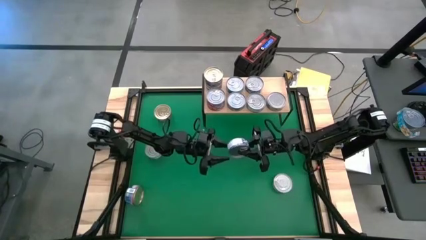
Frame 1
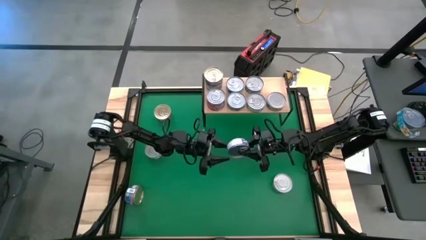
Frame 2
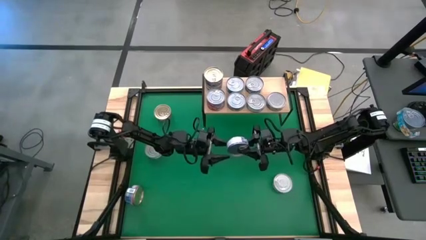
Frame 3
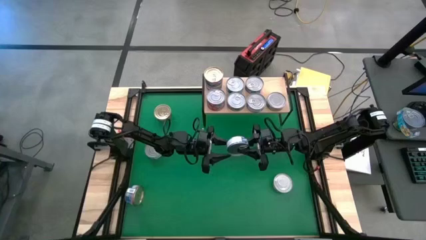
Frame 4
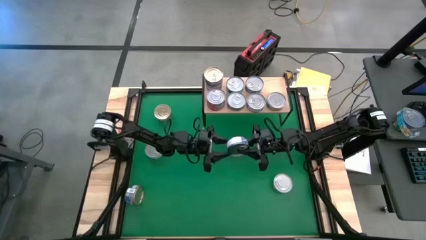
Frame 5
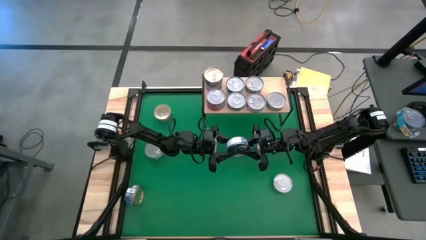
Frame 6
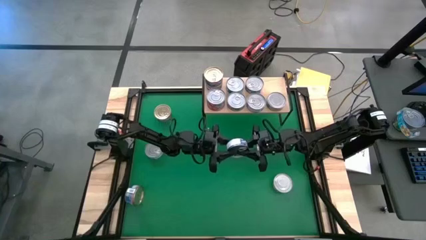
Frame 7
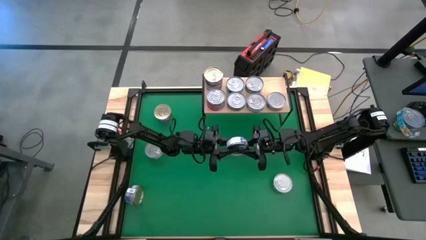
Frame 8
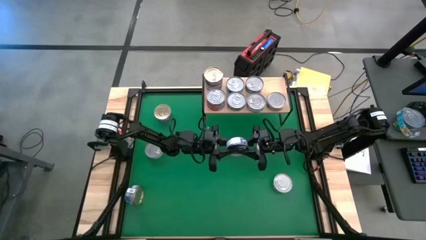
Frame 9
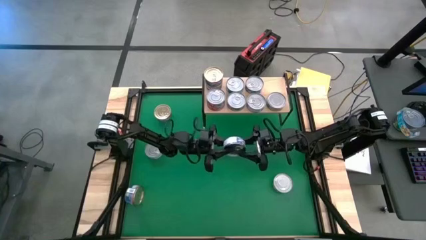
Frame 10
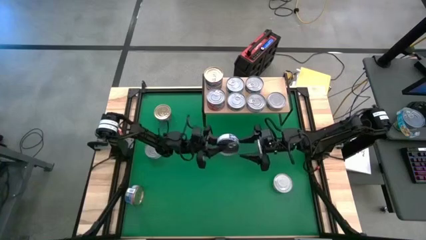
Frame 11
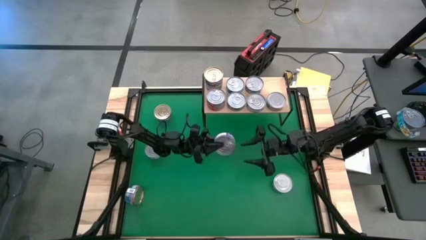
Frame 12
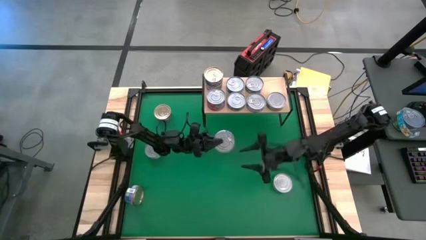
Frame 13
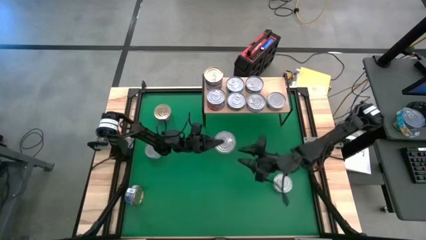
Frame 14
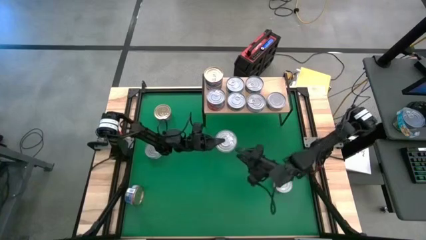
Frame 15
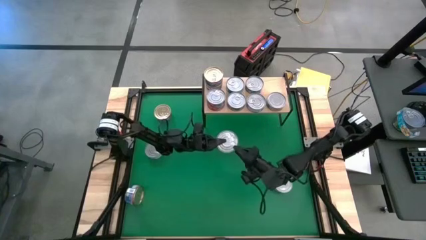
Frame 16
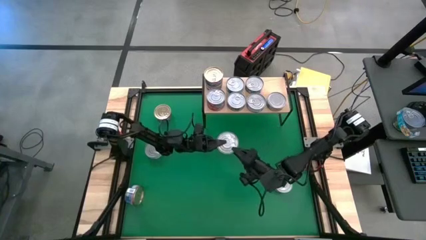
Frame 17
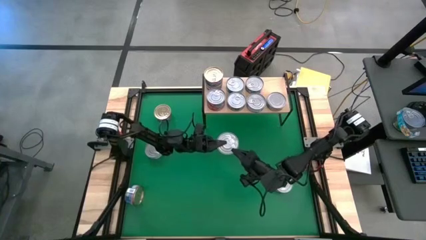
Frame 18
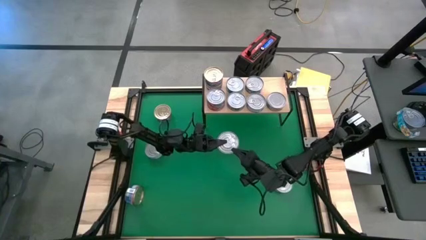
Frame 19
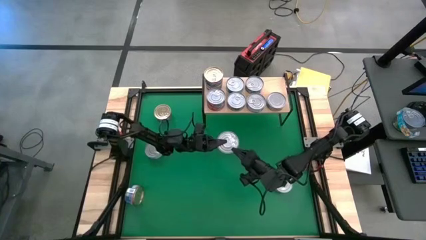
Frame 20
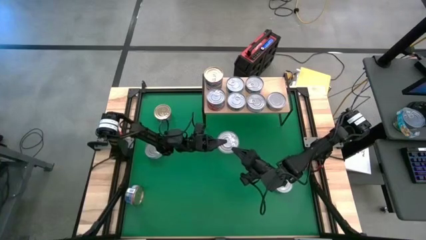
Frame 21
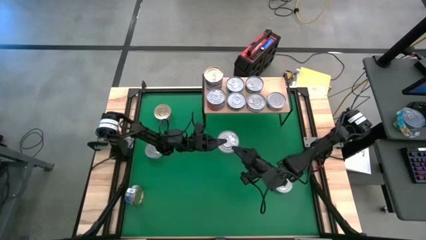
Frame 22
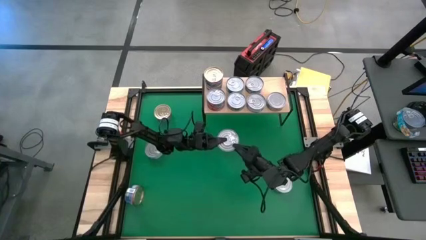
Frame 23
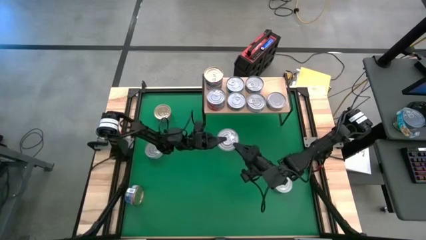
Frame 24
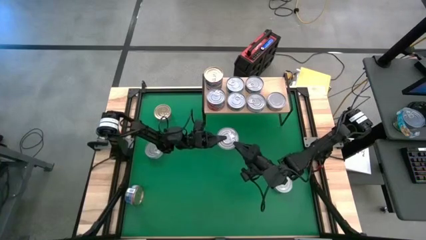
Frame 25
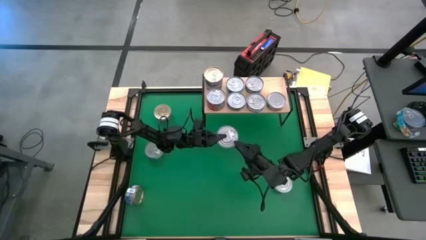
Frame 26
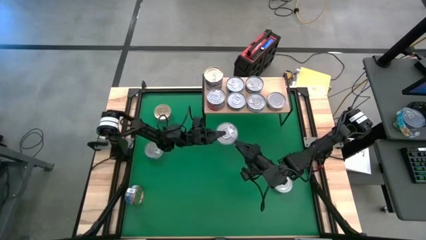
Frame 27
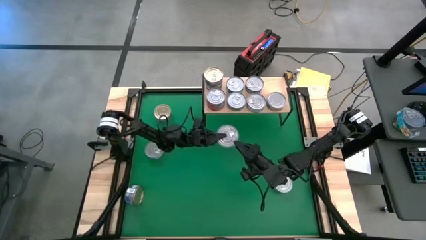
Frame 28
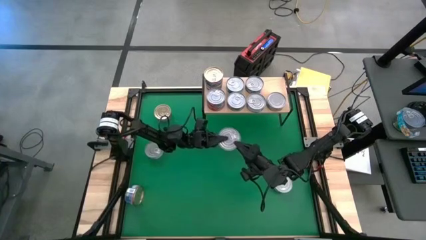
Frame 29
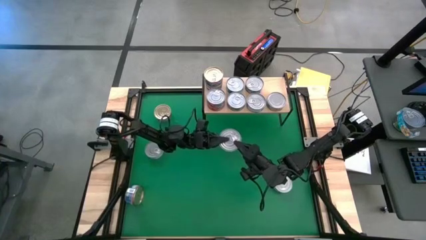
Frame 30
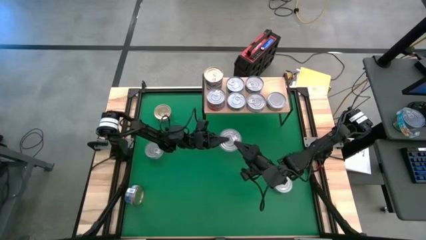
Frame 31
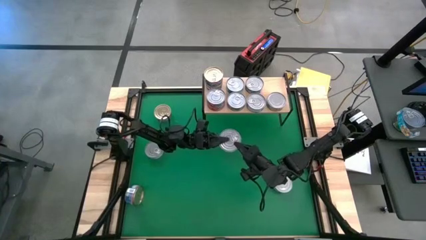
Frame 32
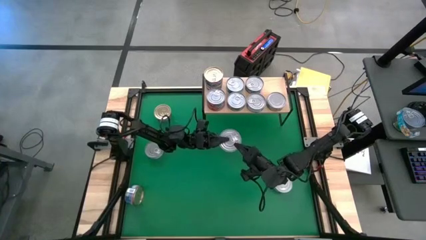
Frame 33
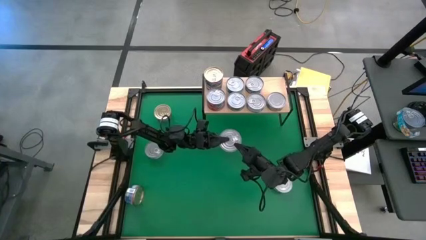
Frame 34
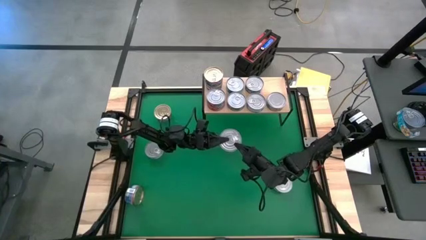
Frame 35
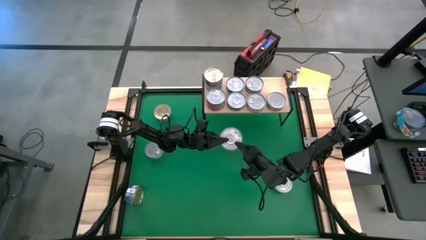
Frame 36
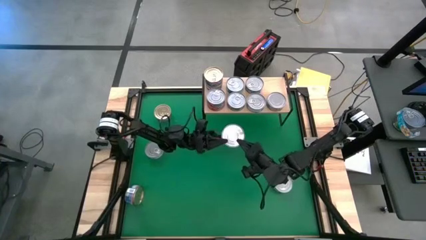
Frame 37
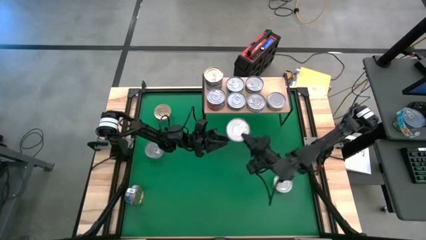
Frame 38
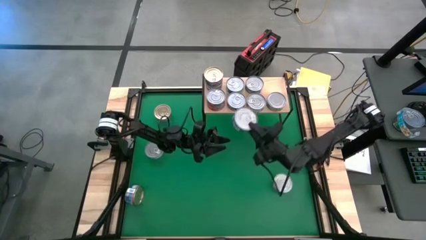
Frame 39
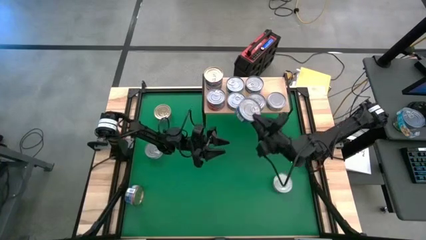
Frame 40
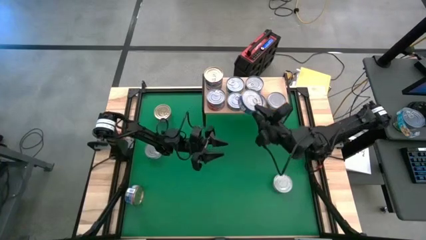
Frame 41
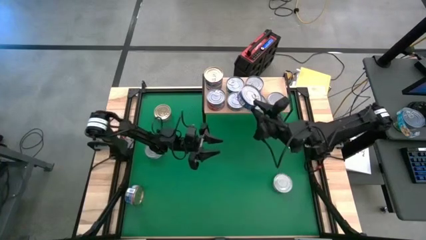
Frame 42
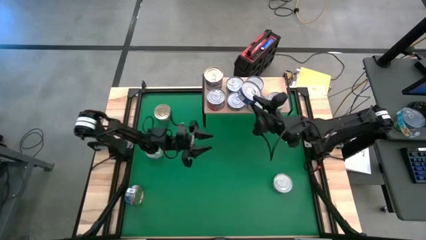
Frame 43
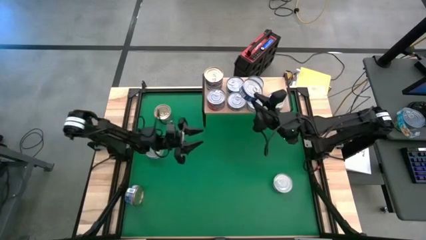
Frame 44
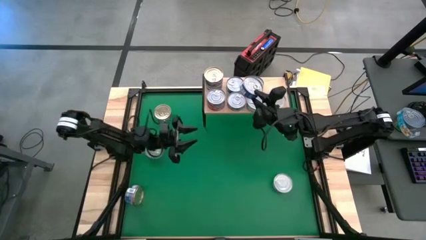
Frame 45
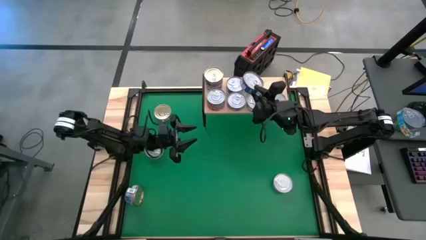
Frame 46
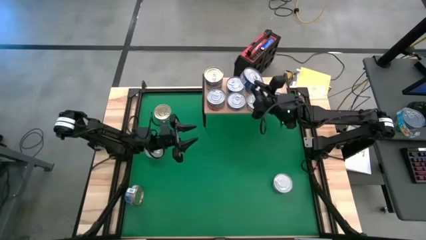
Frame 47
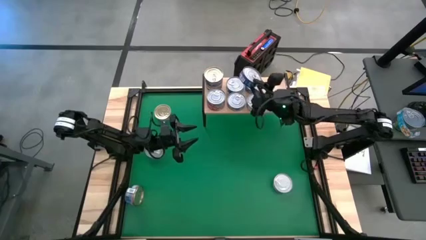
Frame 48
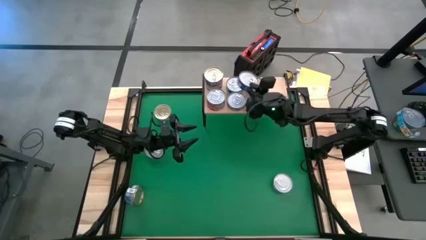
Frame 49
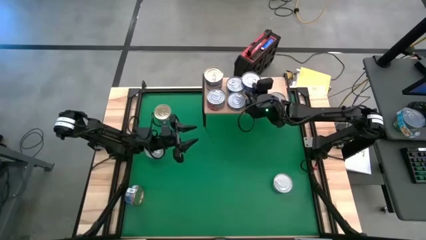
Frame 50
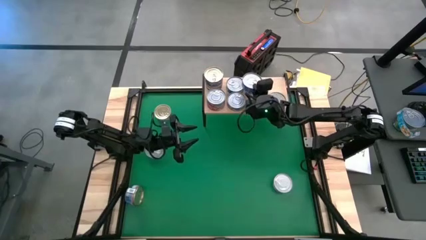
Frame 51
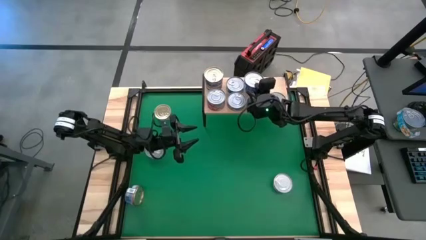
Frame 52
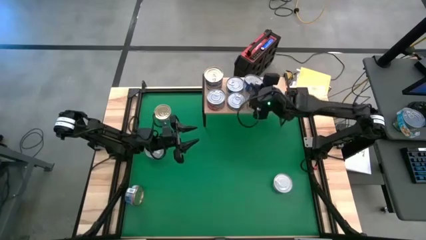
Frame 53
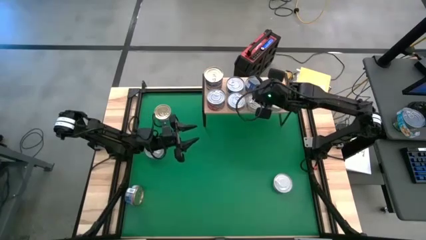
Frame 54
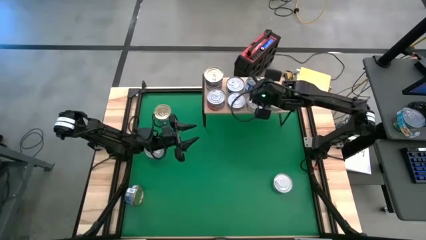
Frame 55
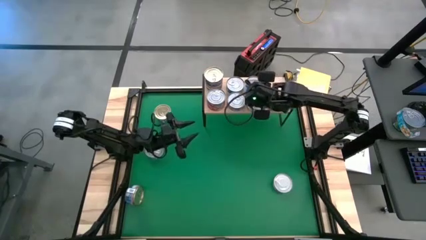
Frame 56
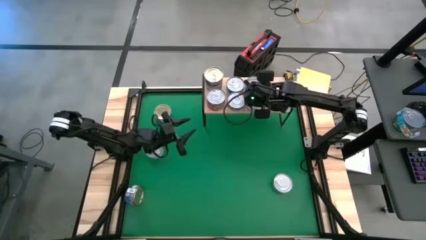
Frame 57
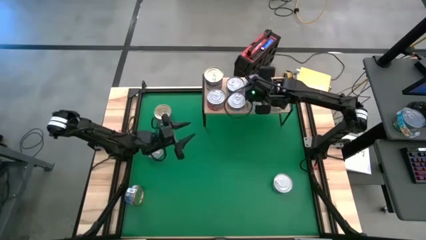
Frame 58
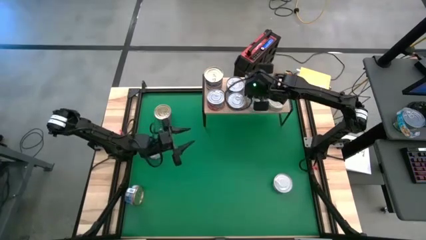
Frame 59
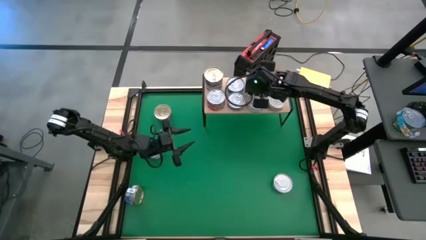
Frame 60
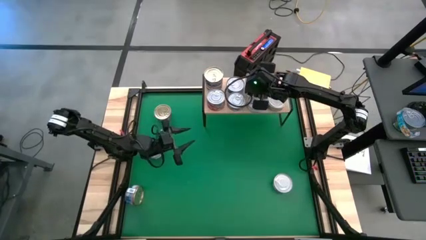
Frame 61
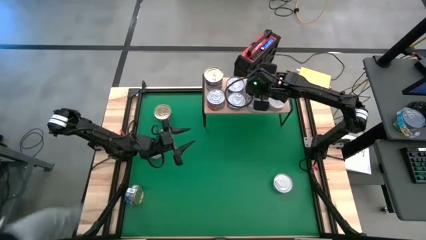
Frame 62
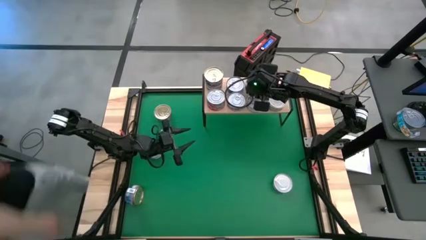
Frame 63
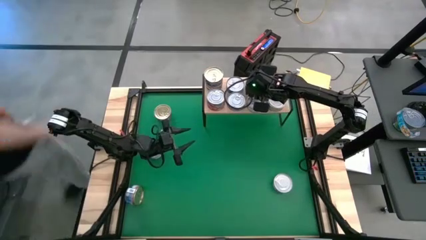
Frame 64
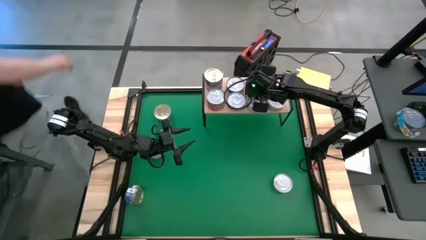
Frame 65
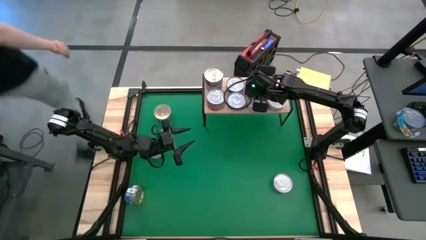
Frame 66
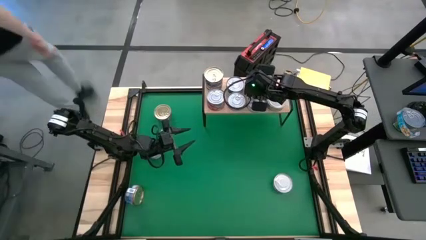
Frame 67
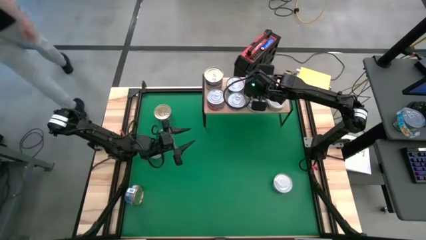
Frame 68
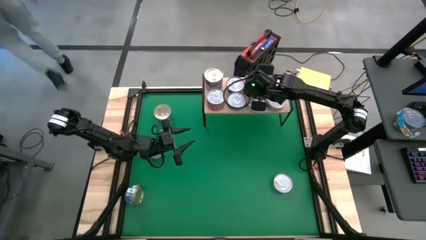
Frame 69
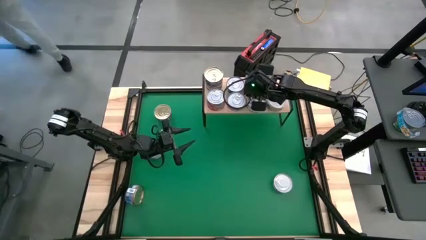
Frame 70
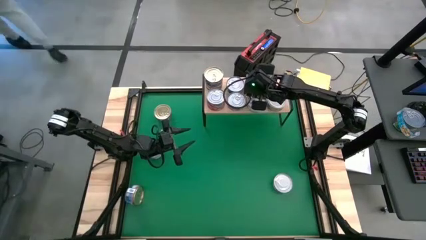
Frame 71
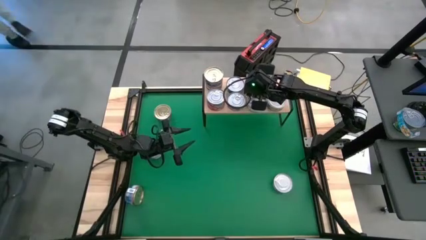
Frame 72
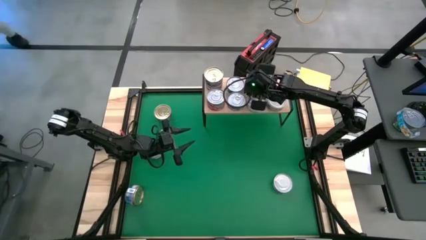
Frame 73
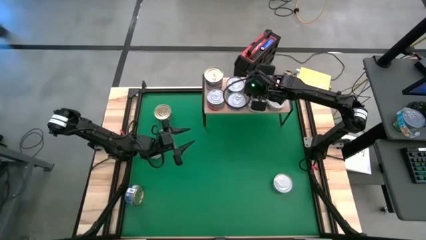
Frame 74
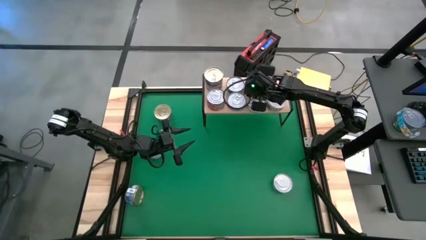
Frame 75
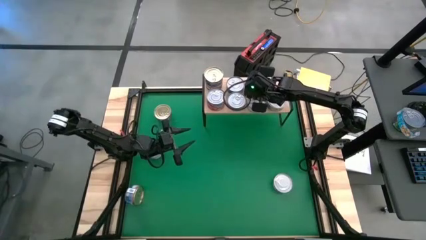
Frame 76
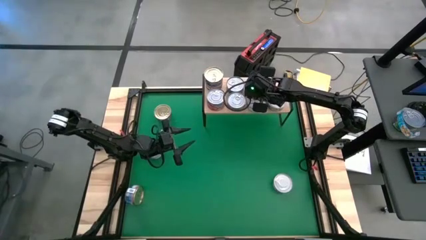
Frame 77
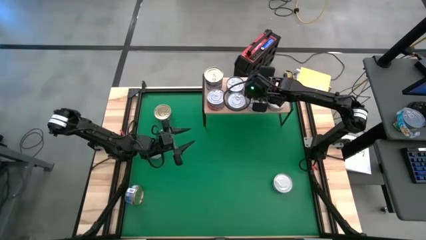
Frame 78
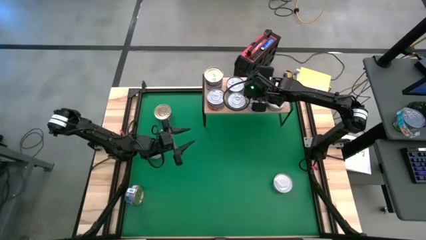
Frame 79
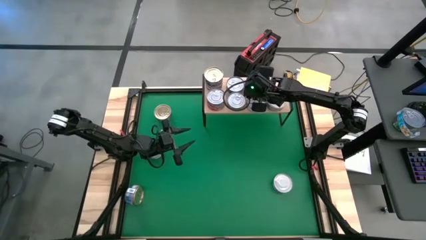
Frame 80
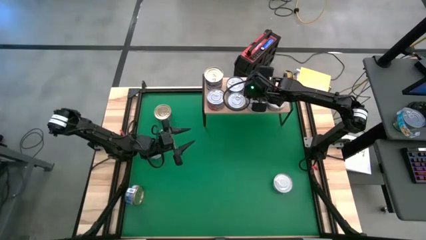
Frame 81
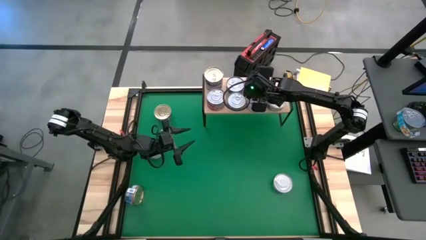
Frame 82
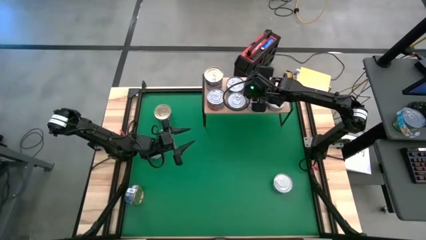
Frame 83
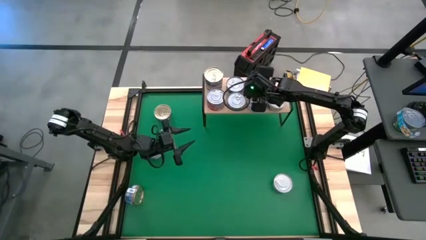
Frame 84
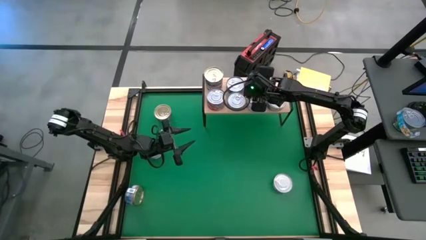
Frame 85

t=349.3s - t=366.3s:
Task: Stack canned seafood by type on shelf
Stack the blue tuna can on top of the other blue tuna can on the shelf
